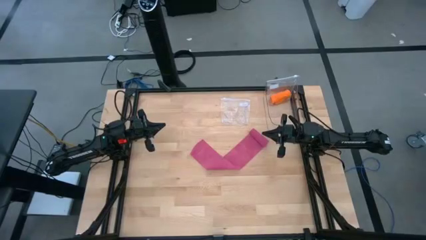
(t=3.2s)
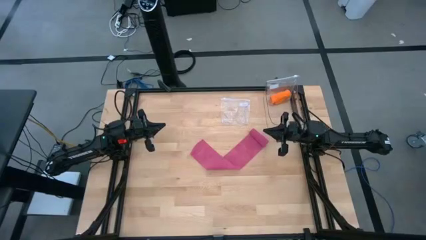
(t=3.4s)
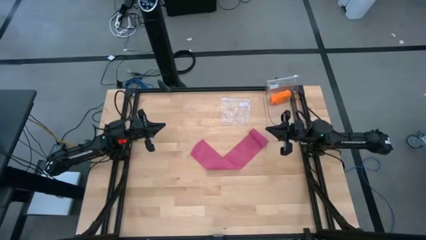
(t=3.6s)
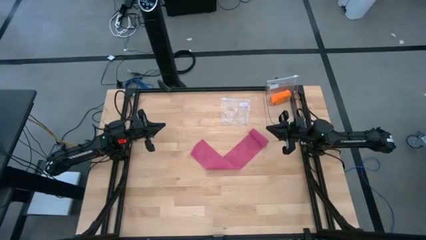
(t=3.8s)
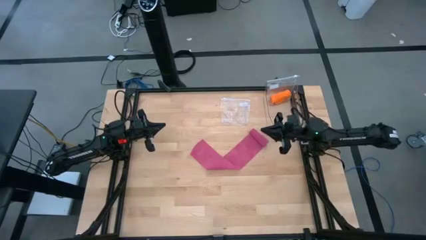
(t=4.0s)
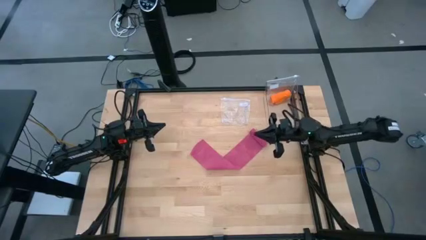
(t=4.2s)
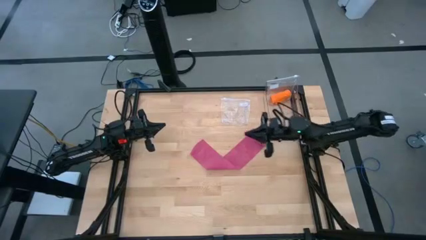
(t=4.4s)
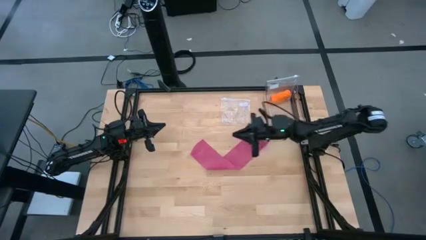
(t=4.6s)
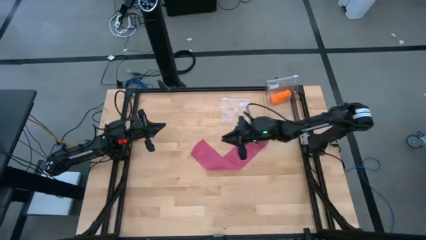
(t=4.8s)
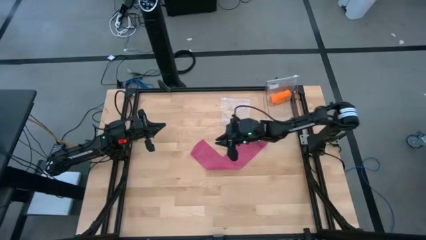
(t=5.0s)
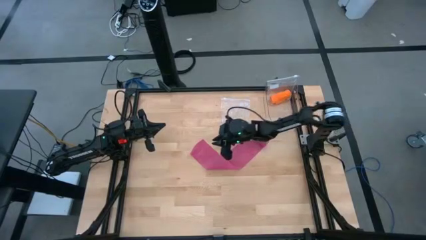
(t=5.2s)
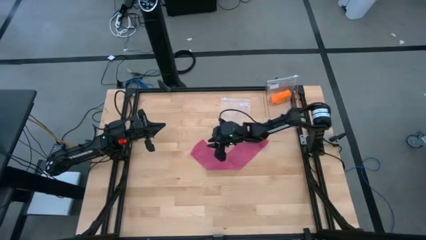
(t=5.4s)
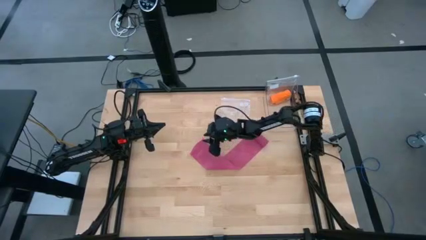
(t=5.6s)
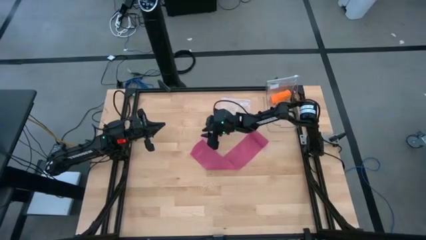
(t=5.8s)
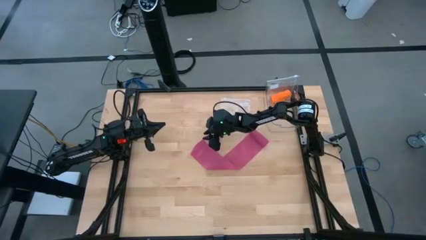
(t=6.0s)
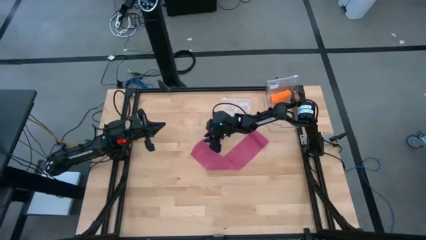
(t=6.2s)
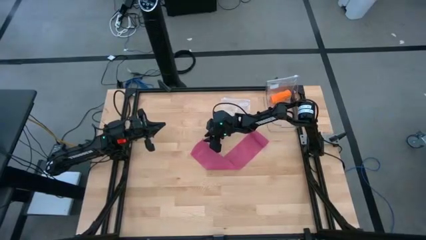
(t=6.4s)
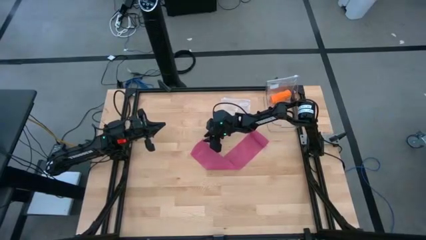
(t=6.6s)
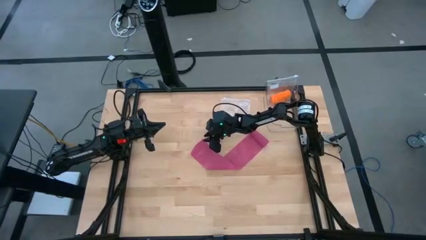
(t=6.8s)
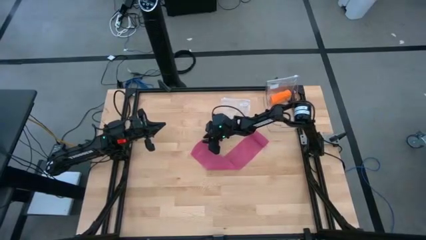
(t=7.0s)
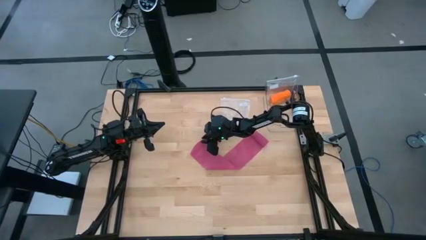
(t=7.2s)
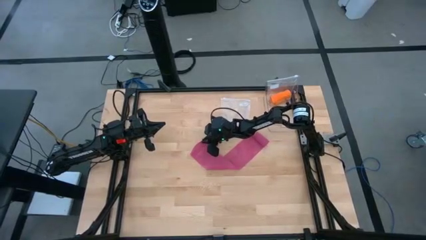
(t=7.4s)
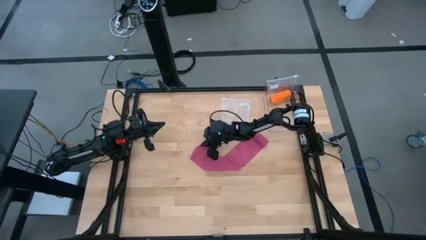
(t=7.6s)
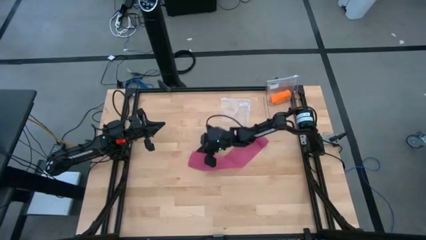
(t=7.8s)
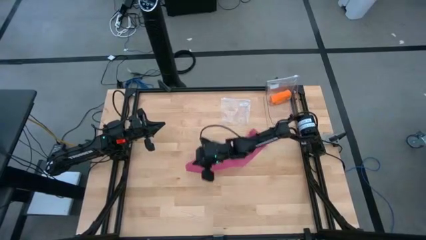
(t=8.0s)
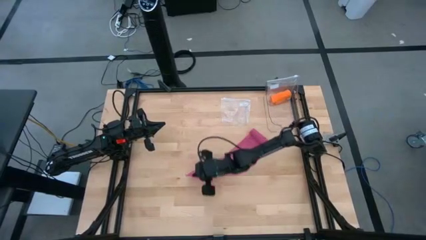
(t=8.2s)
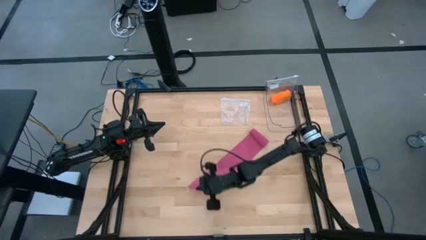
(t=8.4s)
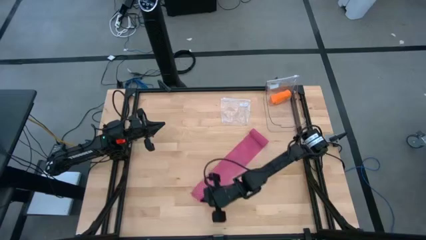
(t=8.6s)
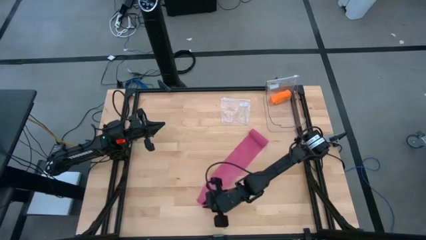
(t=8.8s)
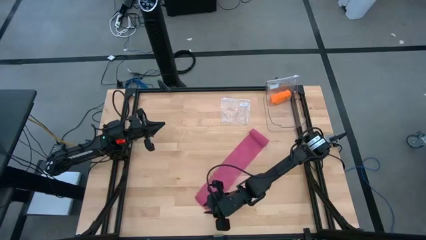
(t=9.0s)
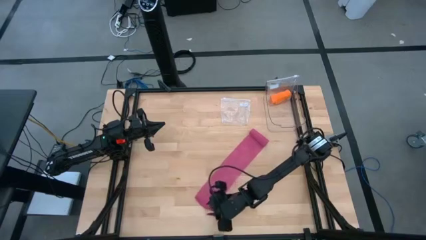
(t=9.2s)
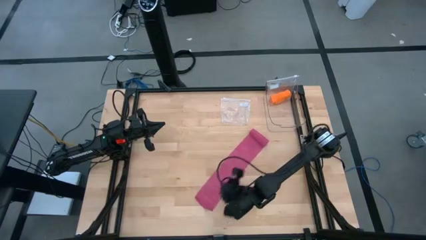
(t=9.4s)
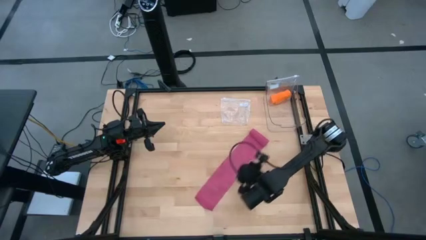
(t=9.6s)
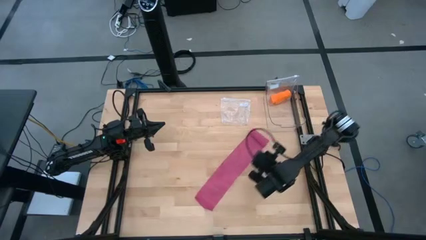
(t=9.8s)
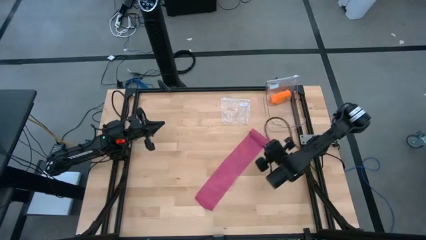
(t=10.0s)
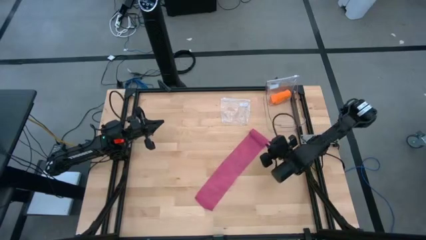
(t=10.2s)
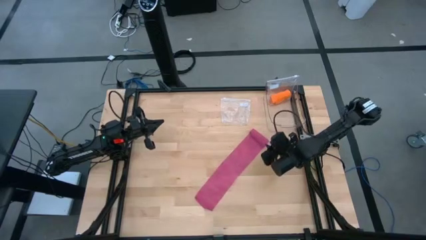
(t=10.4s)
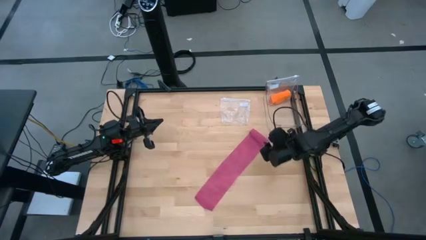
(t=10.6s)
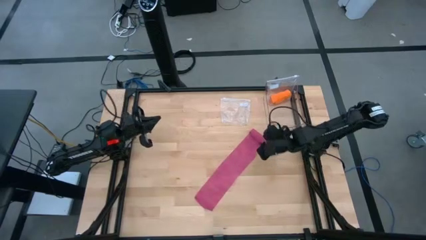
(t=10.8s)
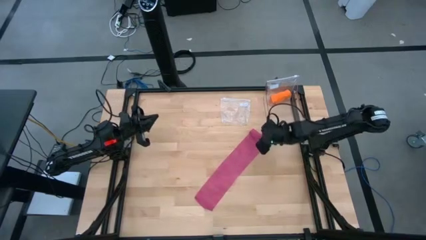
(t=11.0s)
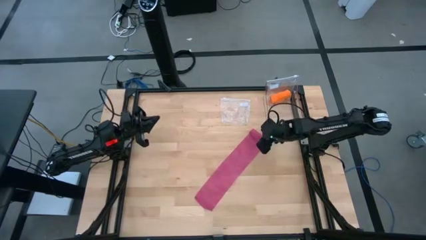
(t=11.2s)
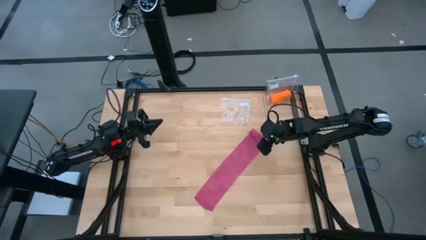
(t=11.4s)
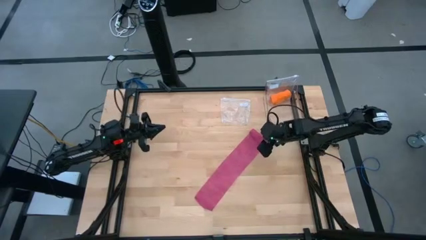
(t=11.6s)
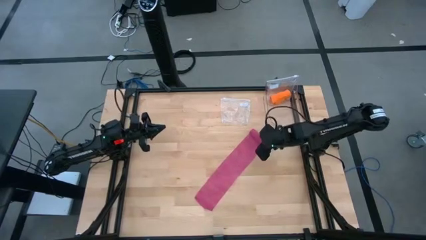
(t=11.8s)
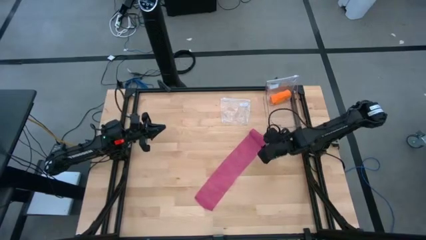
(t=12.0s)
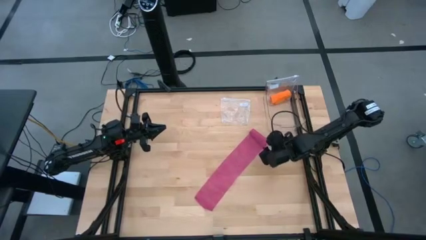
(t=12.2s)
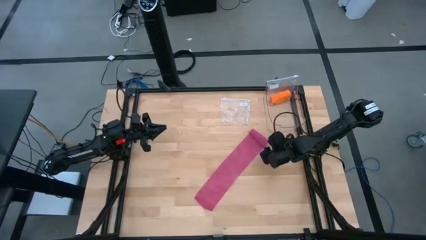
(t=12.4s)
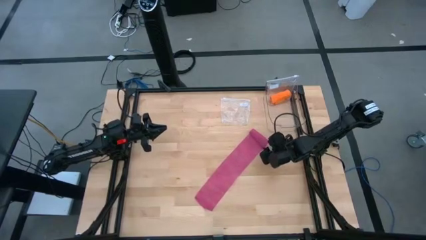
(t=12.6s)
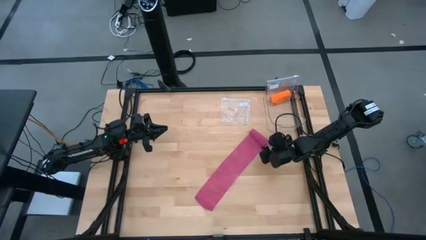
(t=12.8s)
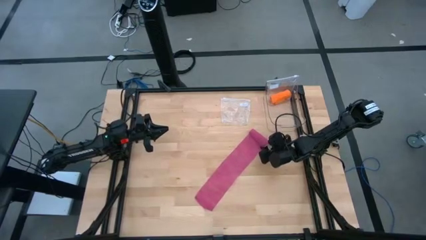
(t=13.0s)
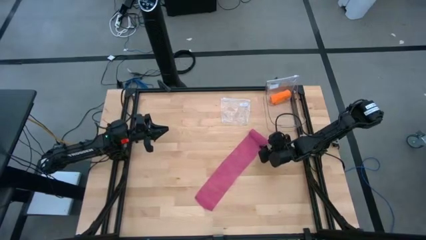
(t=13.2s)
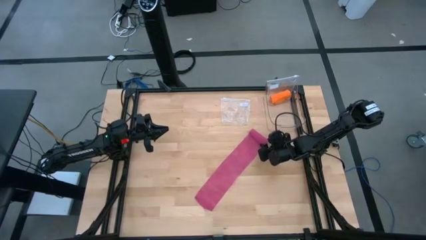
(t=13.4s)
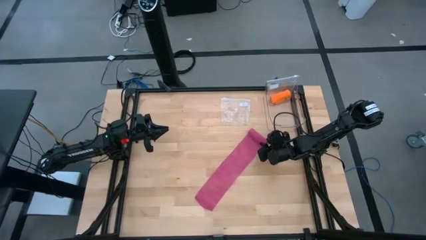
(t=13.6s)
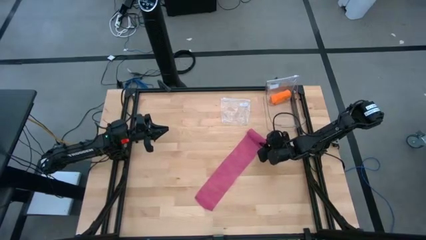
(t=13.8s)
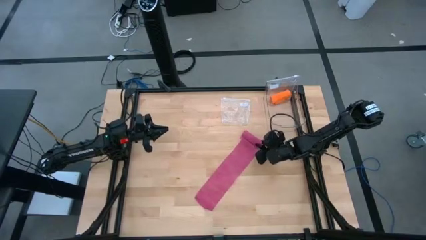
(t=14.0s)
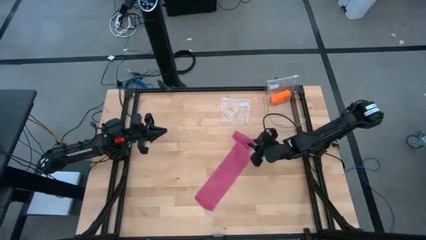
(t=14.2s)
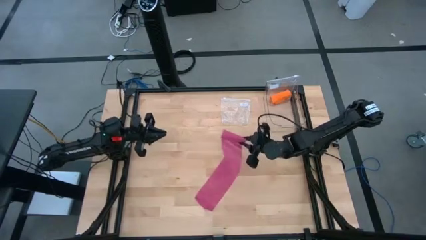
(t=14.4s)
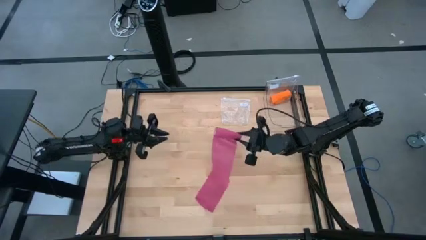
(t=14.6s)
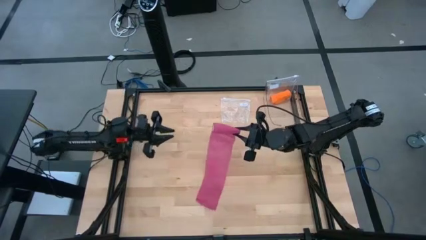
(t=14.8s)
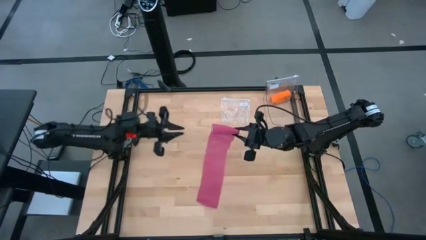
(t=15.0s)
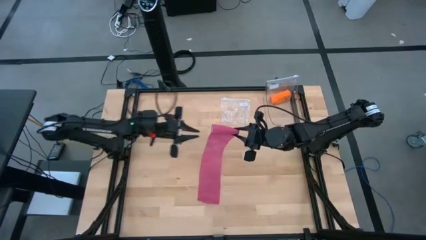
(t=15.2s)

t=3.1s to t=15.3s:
Task: Roll bandage
Roll the pink bandage
